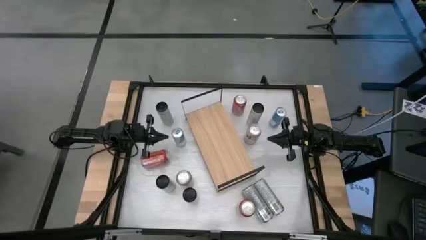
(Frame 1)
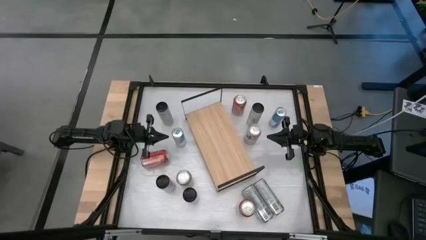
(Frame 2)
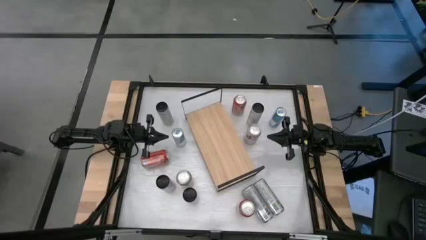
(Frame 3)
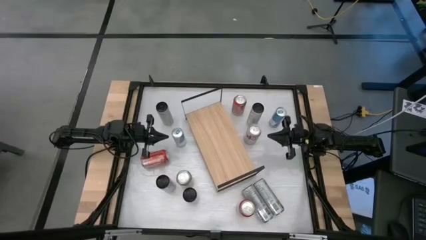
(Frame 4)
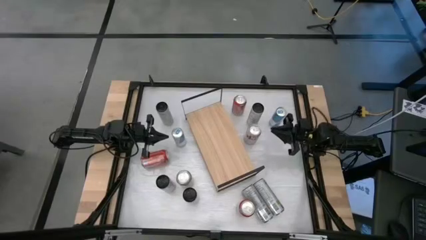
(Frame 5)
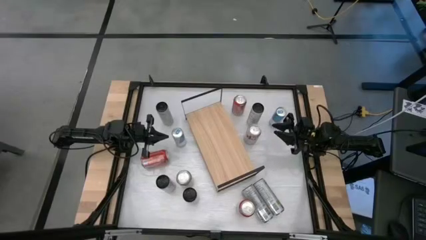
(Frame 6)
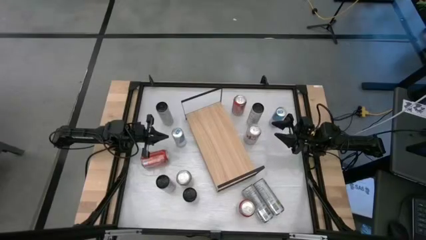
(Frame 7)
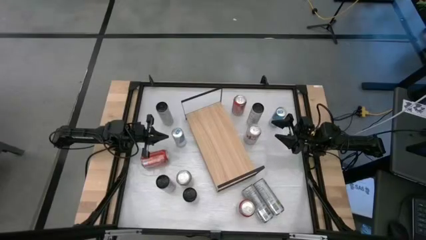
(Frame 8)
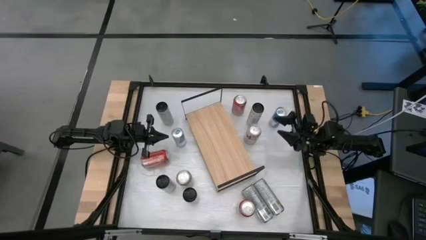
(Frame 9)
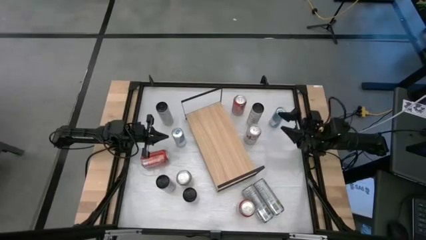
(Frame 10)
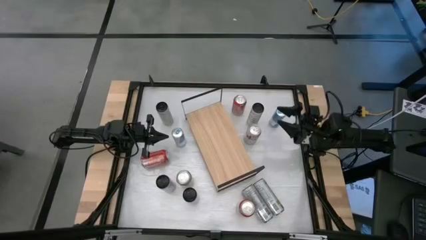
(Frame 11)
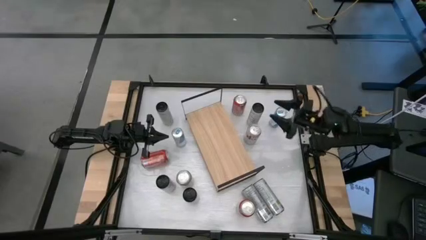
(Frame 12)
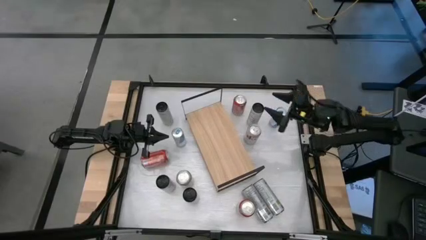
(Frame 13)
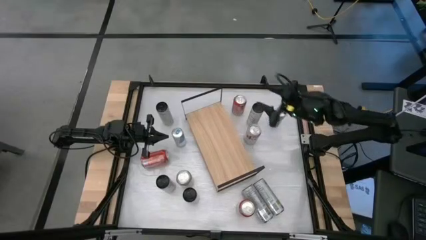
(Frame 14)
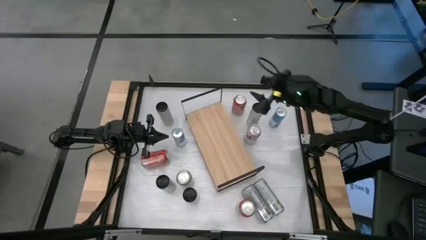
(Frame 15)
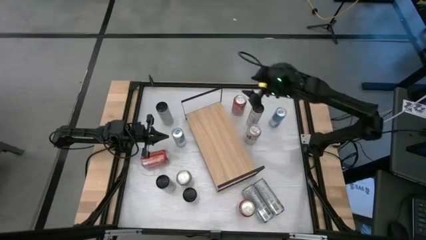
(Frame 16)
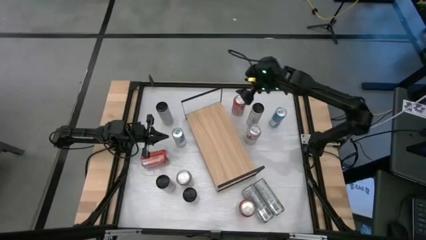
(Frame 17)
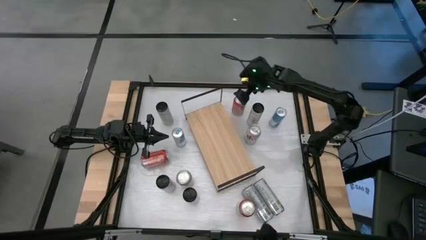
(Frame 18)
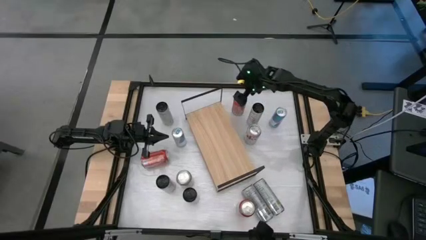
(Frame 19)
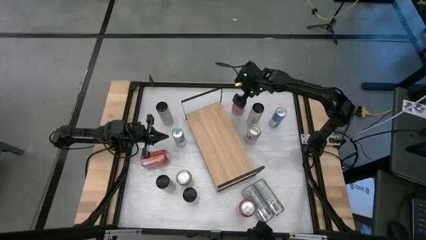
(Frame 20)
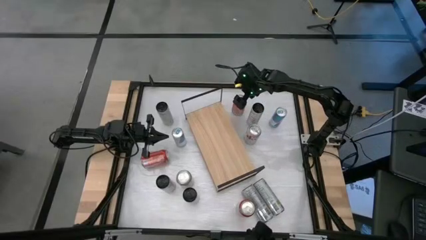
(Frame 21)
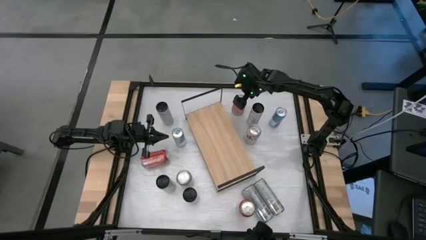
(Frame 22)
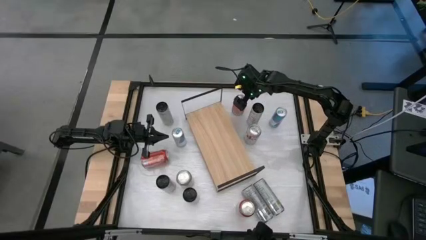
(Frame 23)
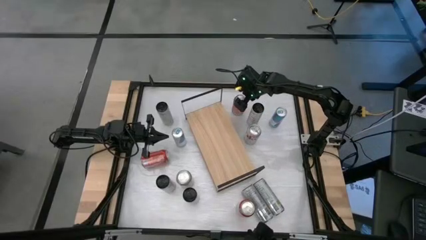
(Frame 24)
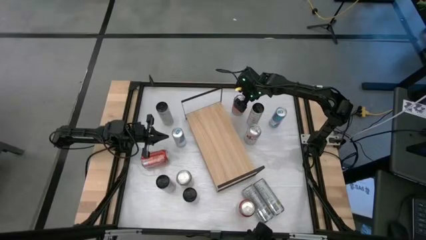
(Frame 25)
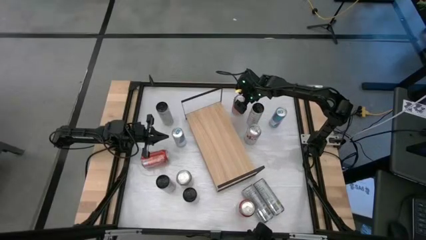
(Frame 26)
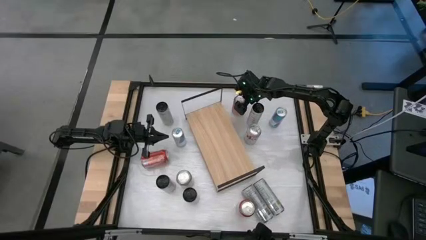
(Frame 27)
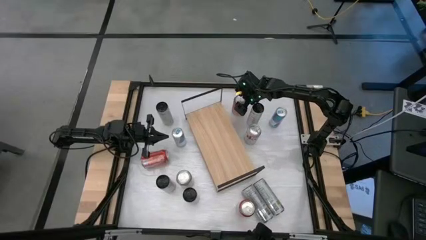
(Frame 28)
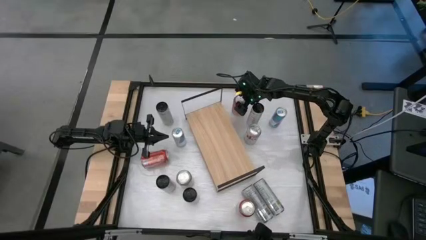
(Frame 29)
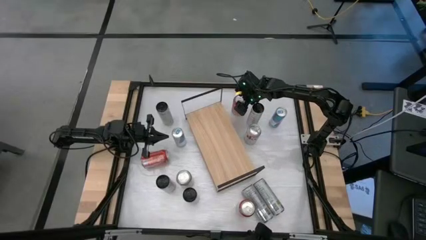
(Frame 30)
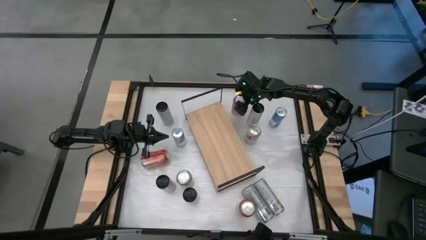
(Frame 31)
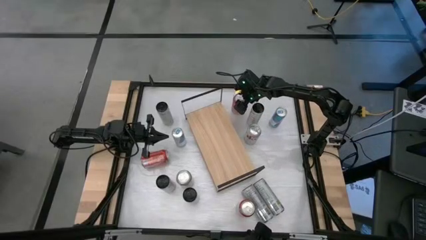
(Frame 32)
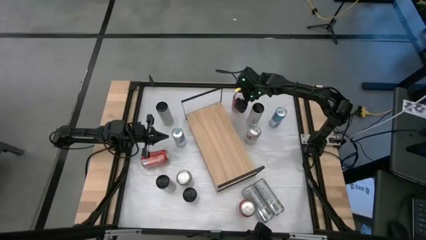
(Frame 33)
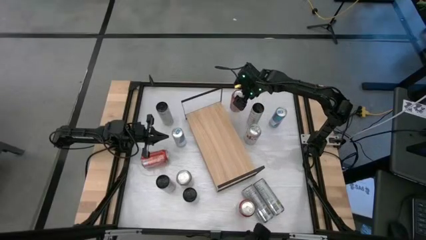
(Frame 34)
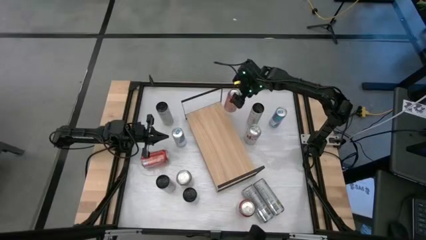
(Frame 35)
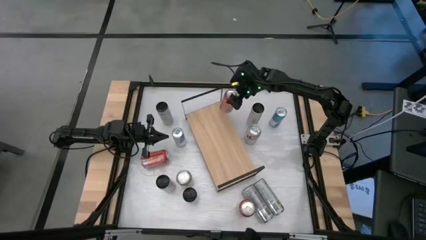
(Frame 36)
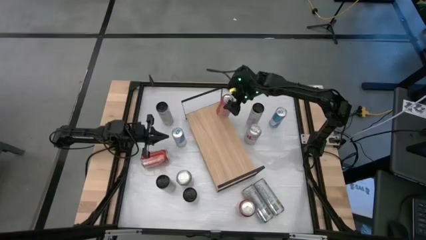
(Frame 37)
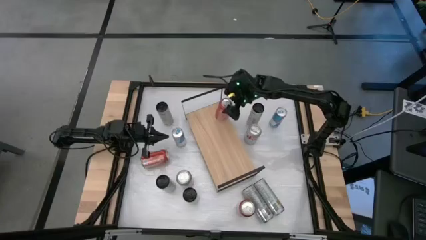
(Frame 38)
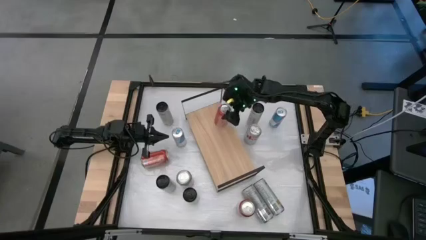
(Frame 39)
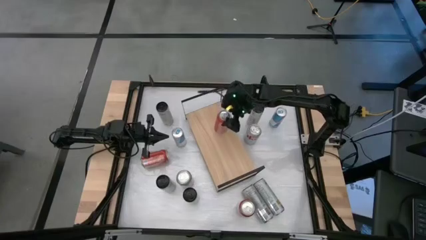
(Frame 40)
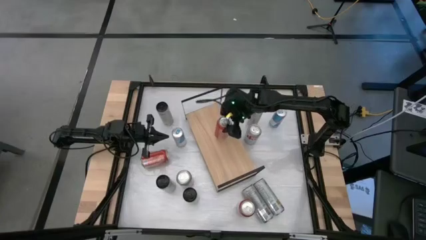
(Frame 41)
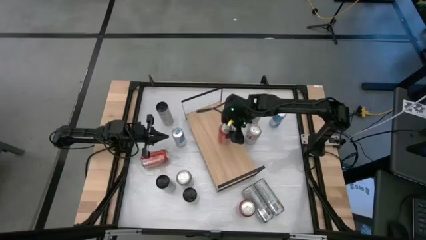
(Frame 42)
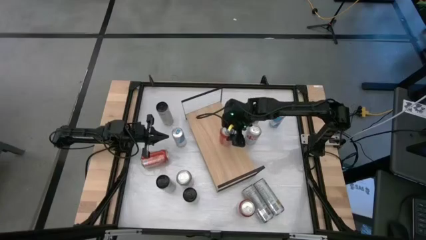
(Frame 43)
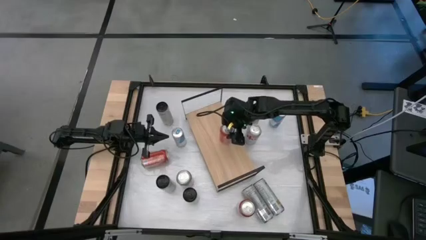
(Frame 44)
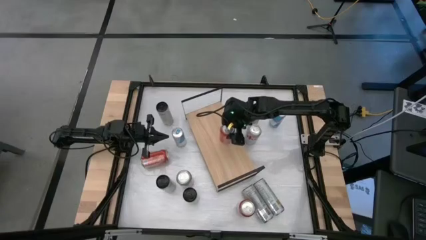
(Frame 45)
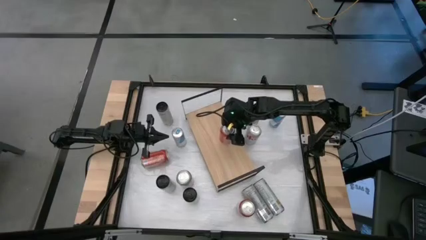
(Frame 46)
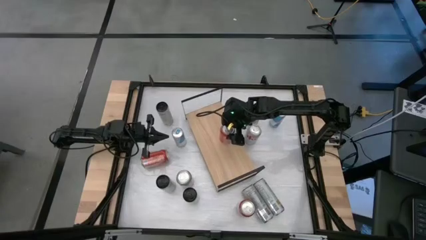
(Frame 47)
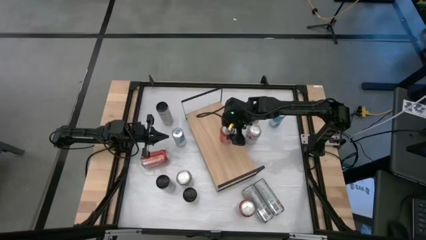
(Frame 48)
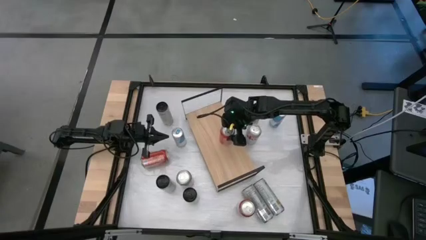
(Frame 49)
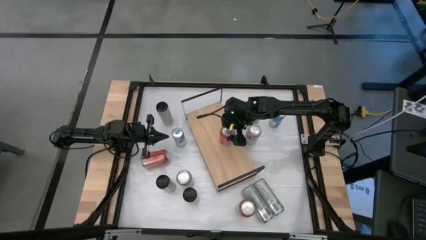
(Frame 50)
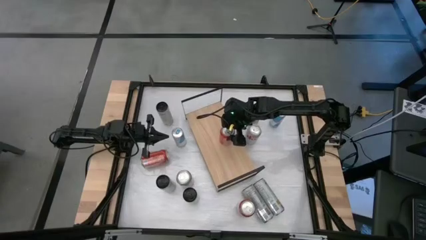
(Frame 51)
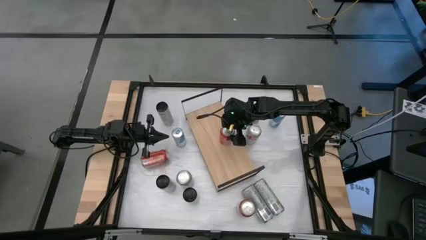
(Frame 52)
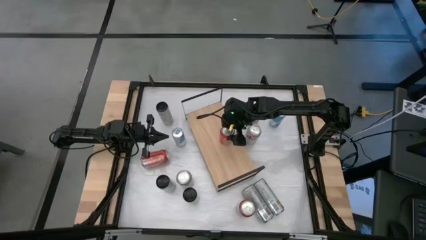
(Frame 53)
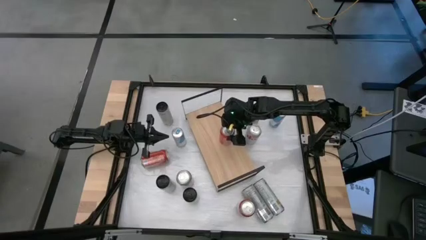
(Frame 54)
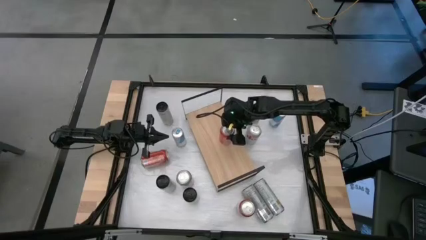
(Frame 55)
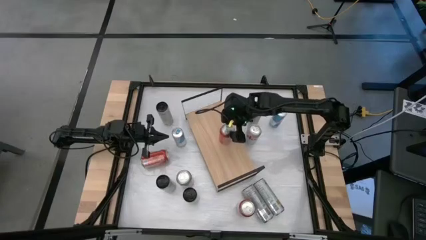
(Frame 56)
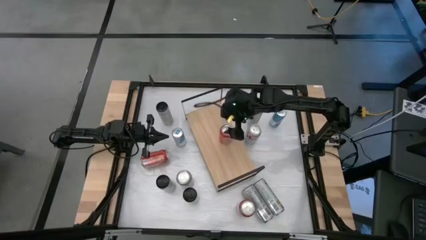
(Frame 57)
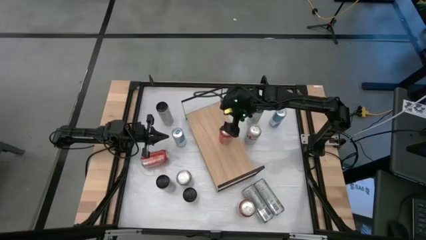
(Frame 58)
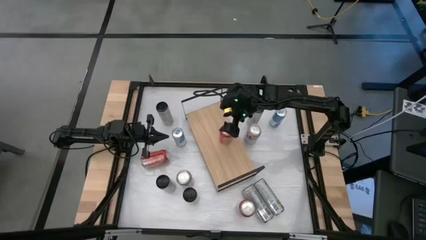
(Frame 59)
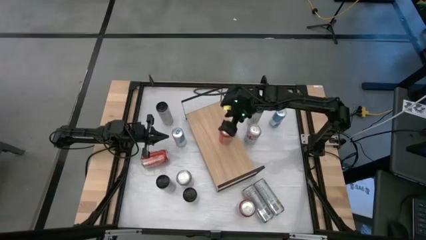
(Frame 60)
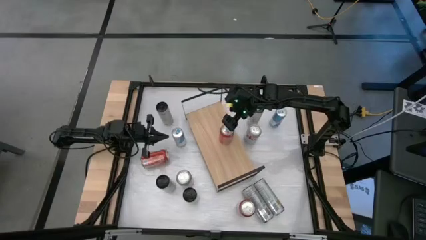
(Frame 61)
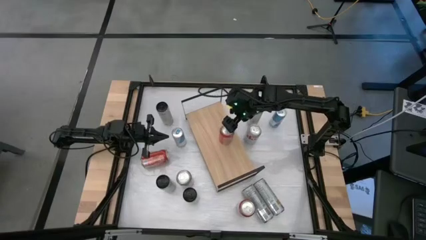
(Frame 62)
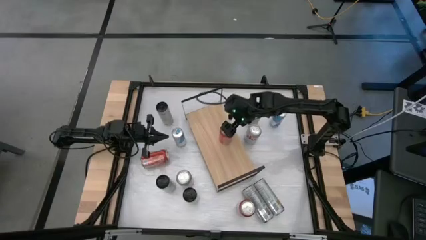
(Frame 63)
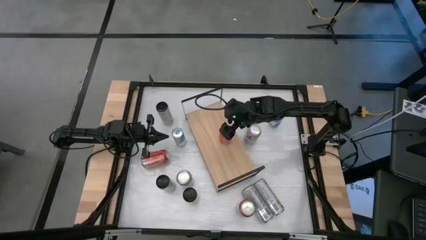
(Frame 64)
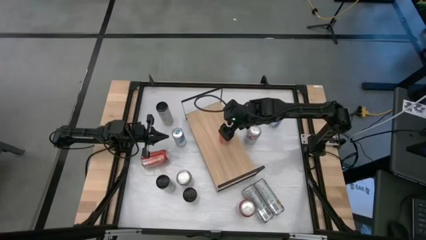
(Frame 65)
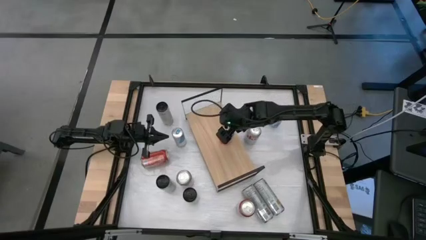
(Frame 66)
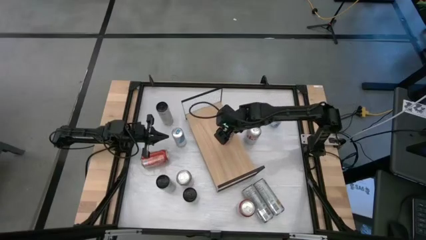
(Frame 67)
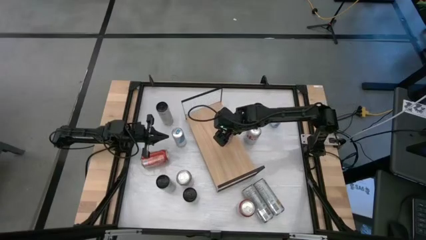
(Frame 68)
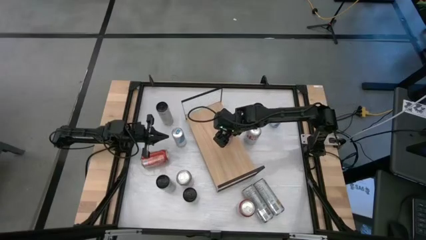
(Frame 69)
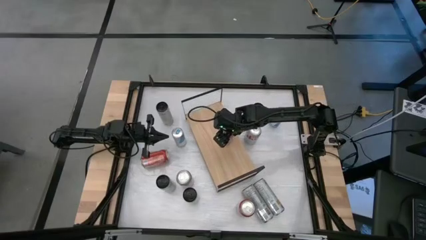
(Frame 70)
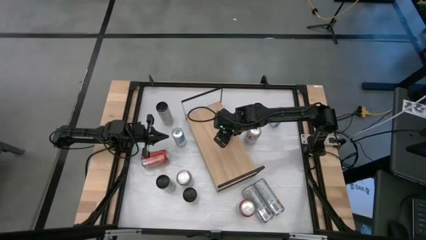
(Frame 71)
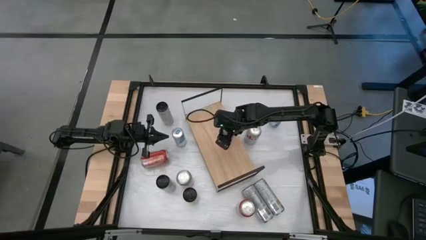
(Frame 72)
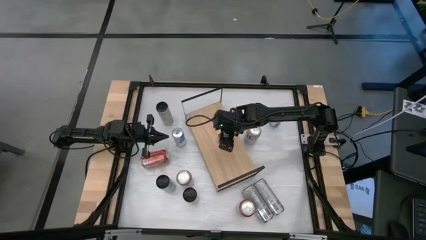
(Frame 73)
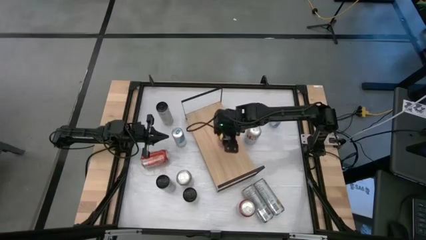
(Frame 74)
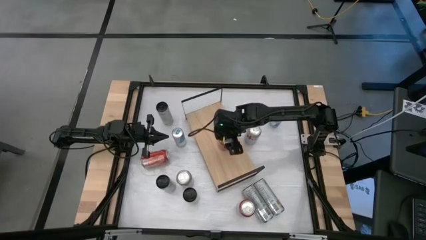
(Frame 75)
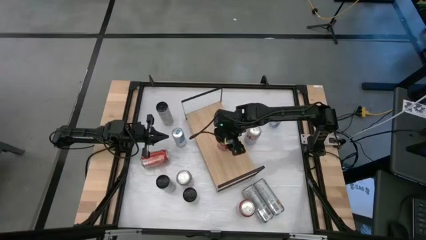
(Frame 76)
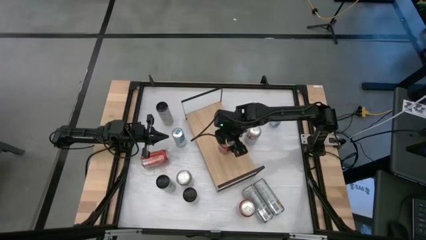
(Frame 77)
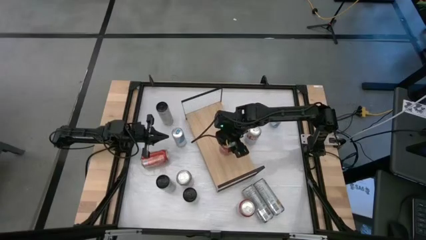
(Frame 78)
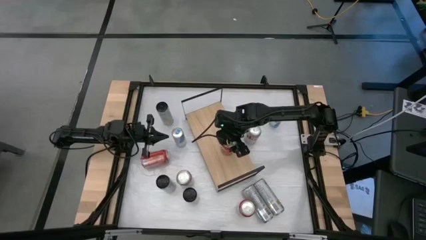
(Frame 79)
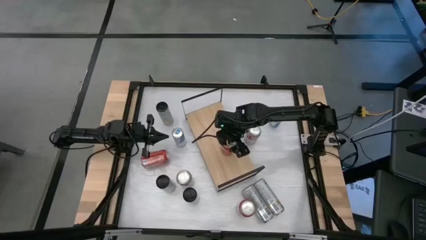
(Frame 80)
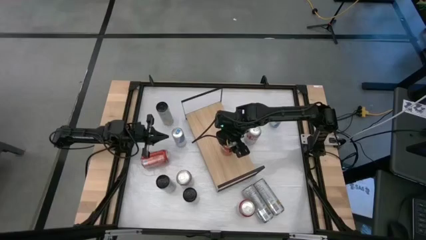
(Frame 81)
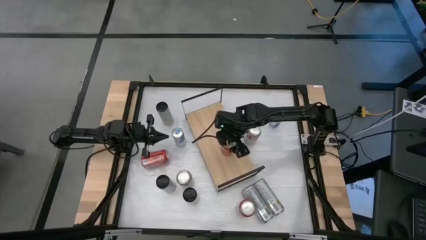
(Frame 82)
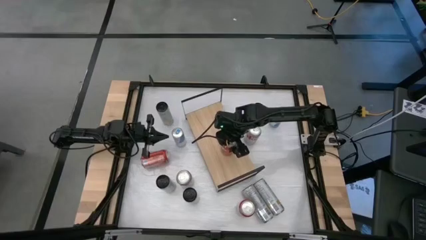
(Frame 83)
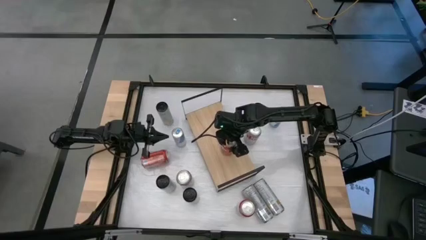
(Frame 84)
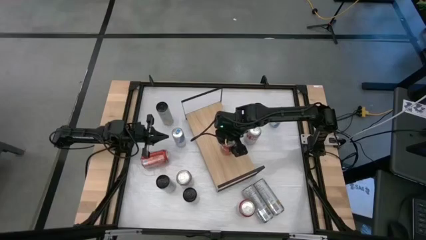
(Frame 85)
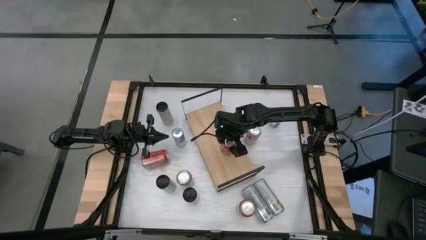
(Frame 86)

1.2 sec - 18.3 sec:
Task: Place canned beverage on shelf
Put the top right orange soda can on the shelf
